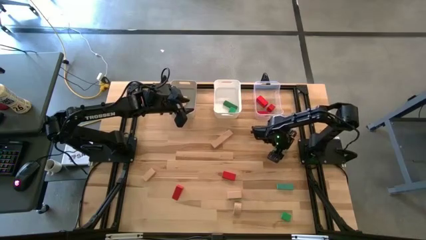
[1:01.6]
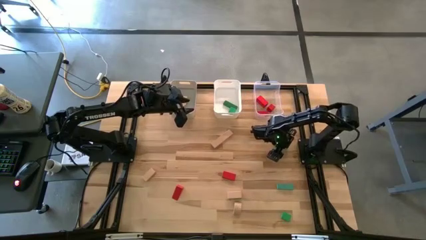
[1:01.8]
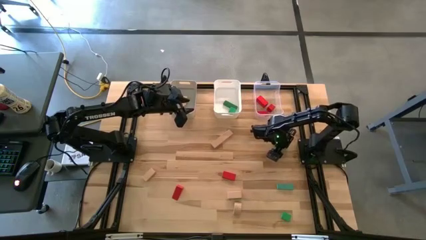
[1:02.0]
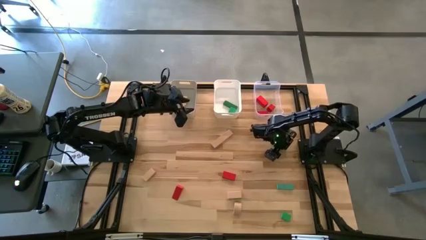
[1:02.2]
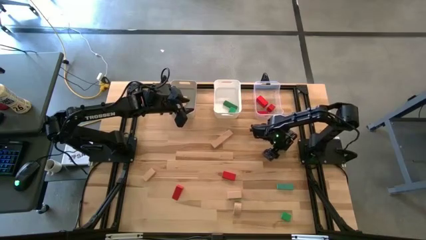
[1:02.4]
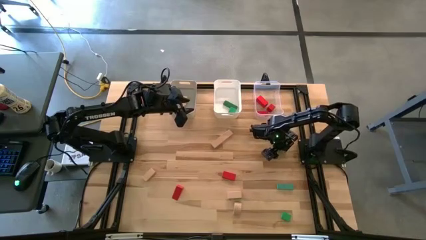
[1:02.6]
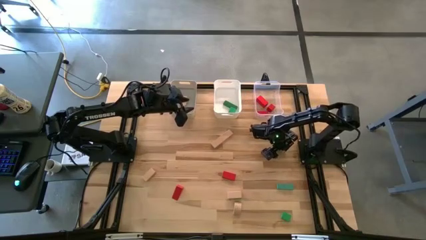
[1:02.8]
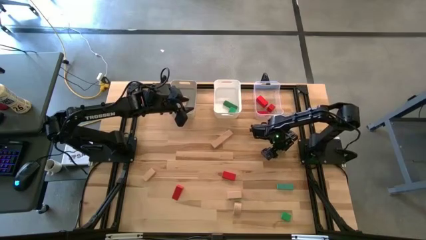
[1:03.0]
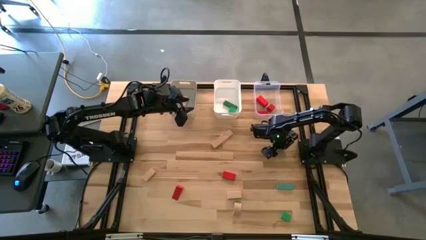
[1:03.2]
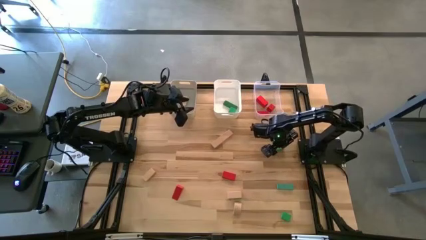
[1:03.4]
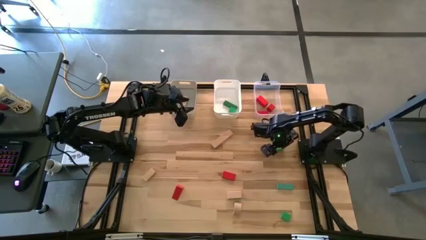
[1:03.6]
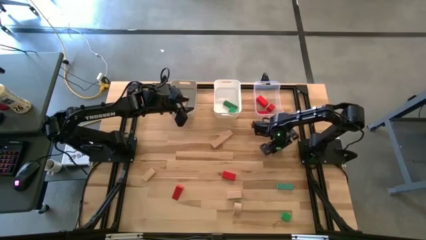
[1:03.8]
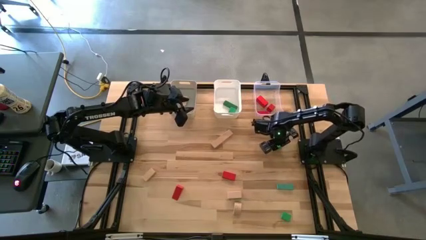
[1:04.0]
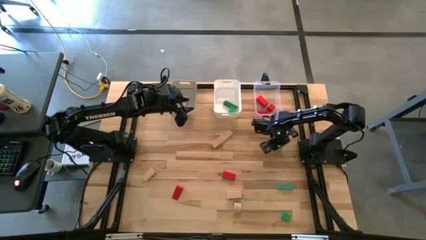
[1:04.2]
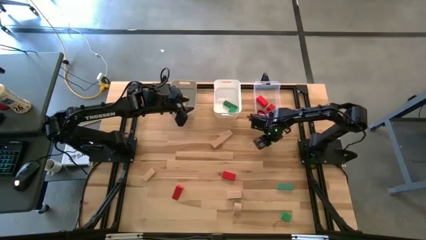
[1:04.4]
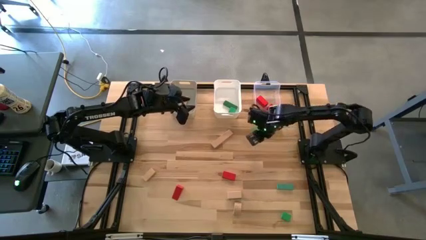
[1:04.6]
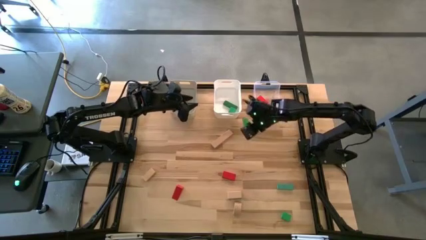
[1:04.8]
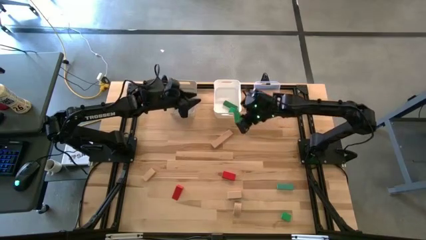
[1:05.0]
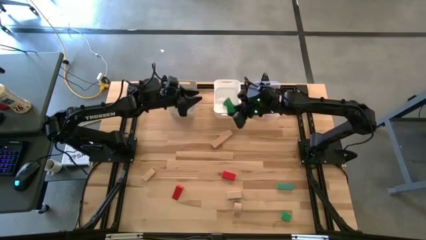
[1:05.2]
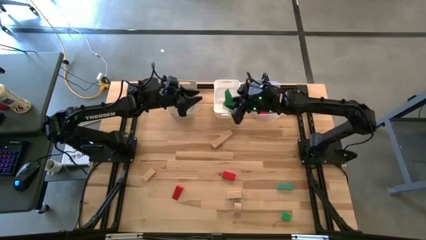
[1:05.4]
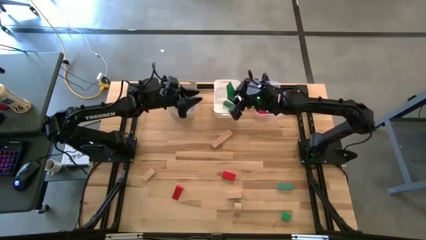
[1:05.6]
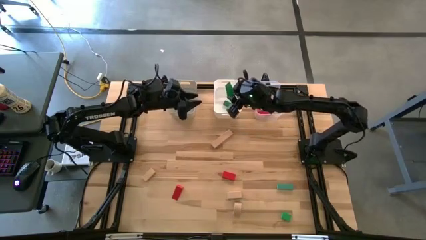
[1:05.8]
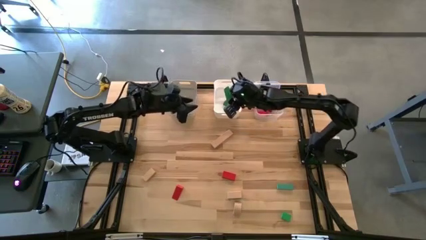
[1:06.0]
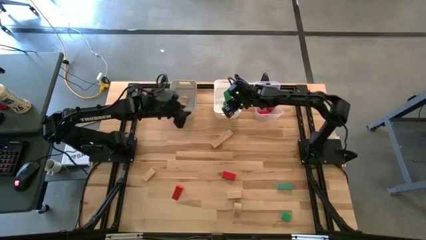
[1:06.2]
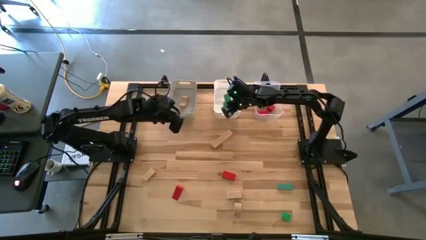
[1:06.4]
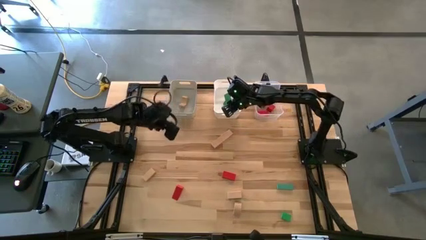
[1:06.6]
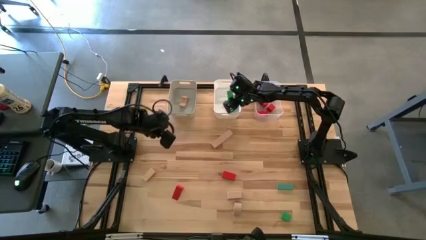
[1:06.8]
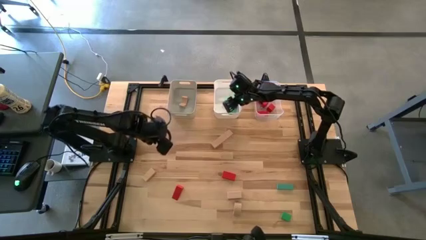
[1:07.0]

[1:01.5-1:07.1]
Task: Sort & place blocks by color
Put the green triangular block into the white bin

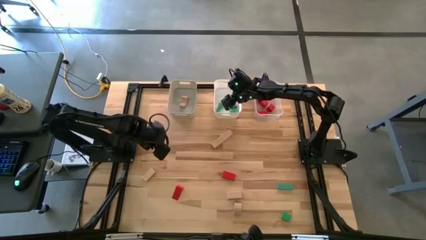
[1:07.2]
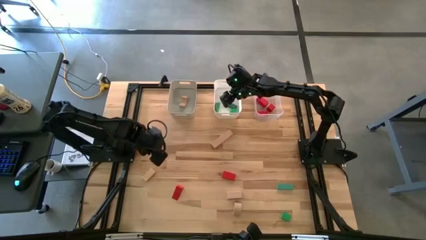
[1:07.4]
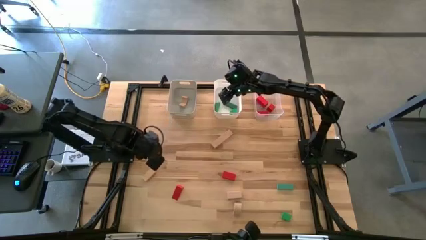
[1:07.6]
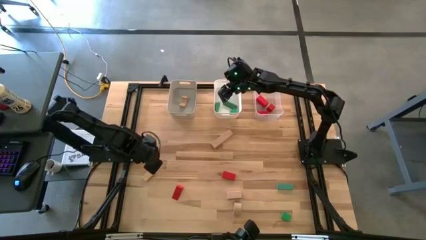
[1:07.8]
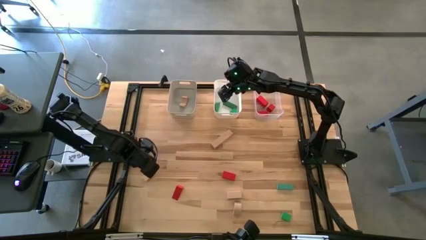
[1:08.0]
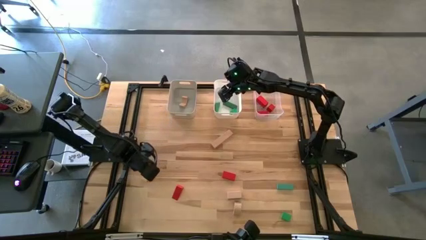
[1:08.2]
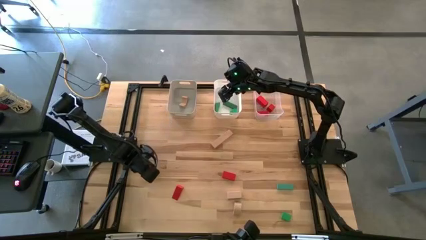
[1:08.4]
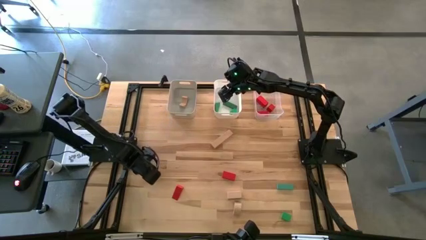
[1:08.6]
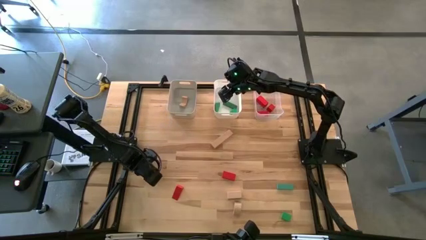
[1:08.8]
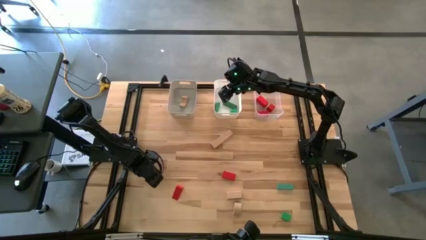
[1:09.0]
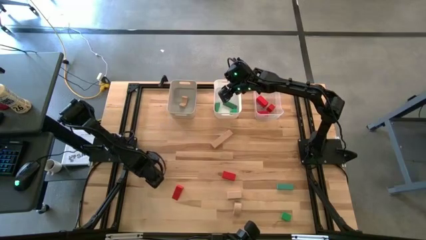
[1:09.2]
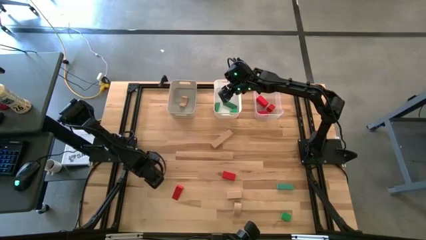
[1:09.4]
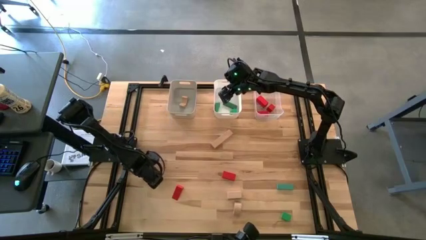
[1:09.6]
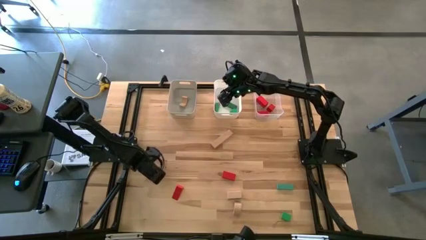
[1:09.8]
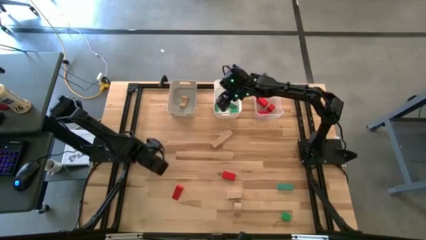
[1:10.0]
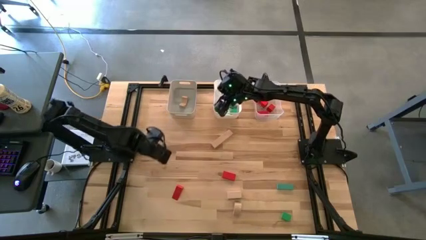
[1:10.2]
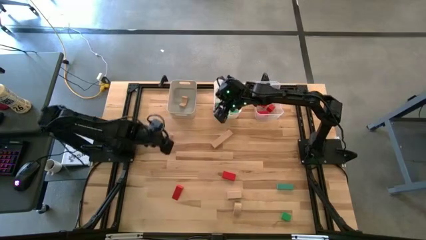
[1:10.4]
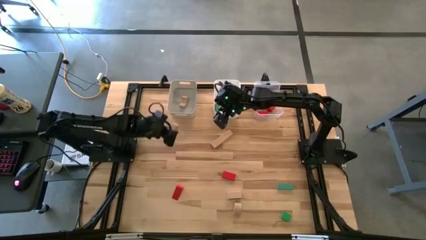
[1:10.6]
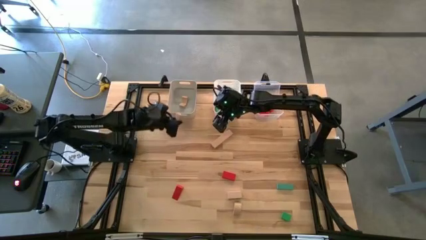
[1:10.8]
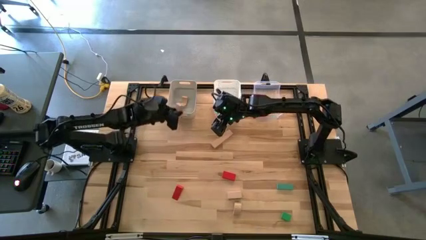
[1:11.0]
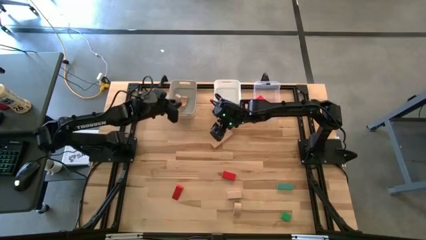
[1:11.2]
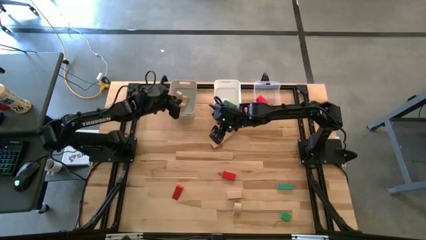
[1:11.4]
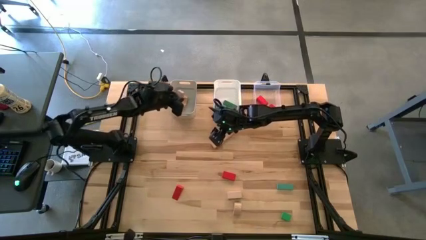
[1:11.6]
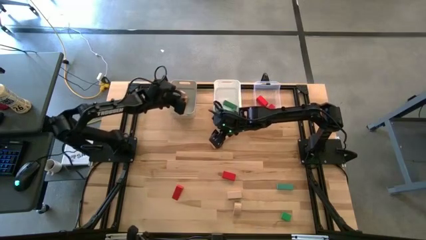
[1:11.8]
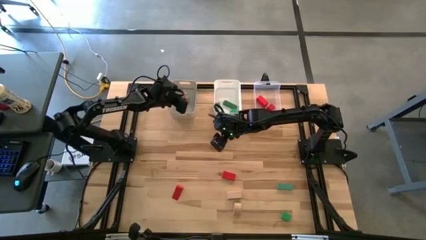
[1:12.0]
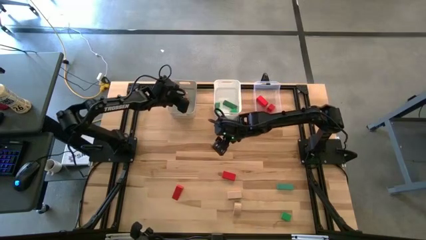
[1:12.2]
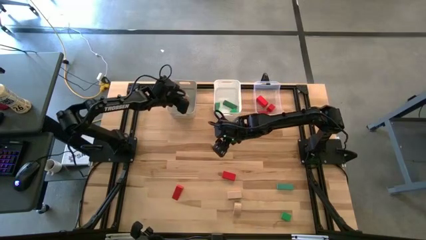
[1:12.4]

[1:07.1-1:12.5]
Put the brown triangular block into the gray bin

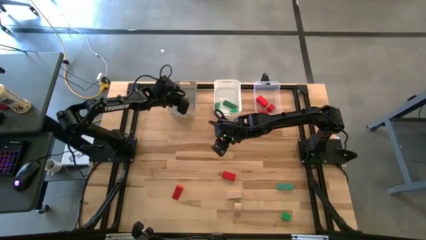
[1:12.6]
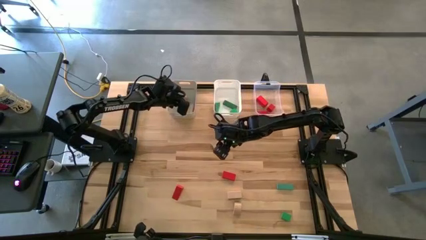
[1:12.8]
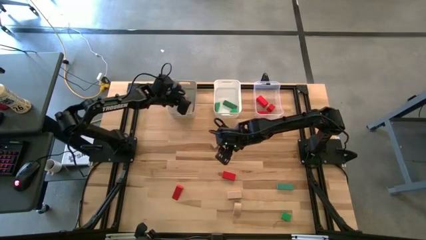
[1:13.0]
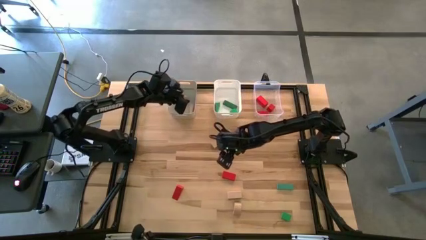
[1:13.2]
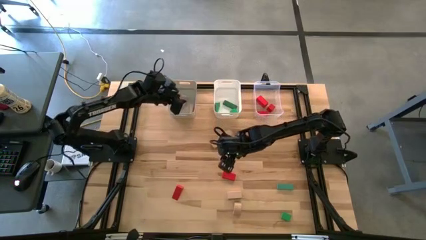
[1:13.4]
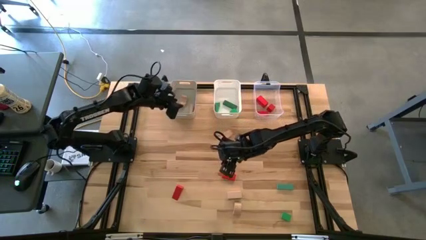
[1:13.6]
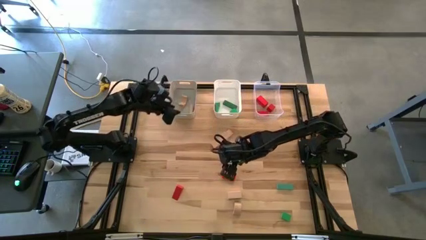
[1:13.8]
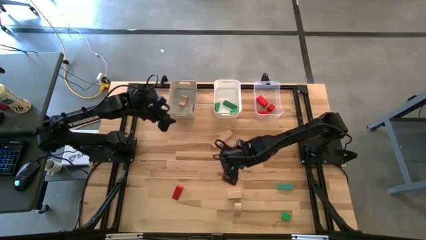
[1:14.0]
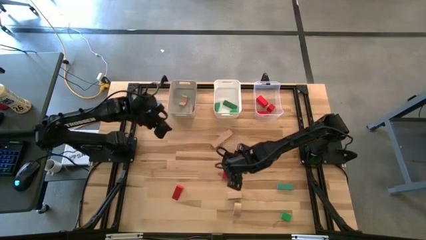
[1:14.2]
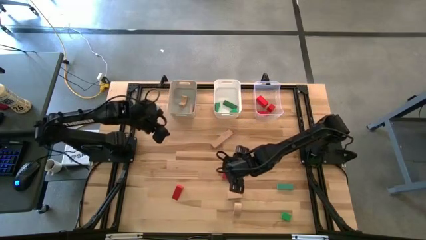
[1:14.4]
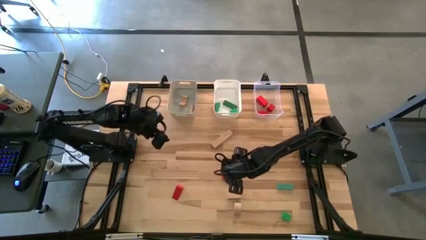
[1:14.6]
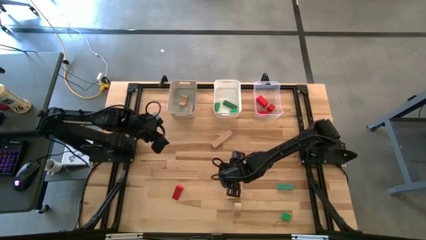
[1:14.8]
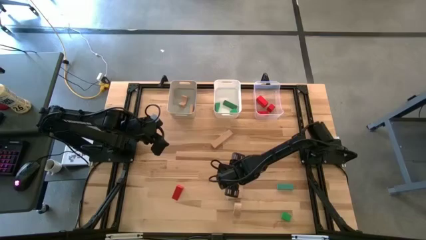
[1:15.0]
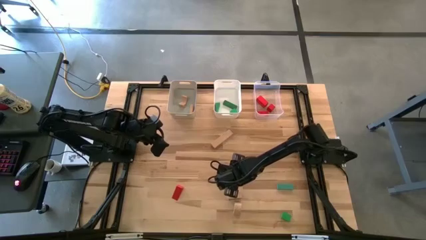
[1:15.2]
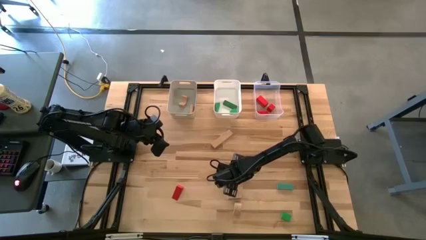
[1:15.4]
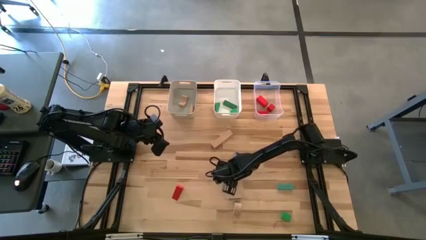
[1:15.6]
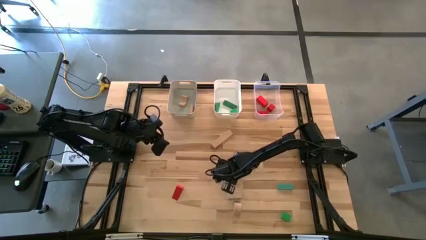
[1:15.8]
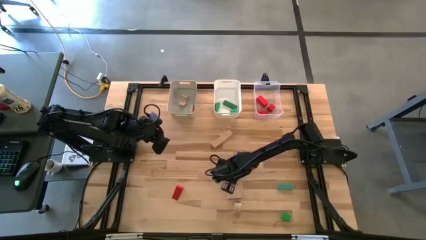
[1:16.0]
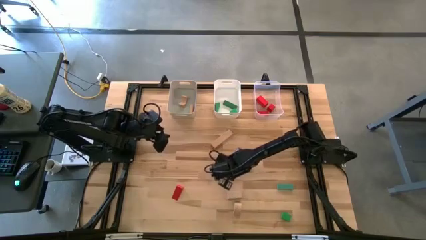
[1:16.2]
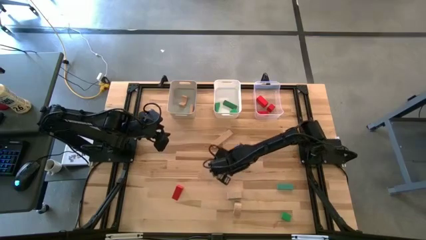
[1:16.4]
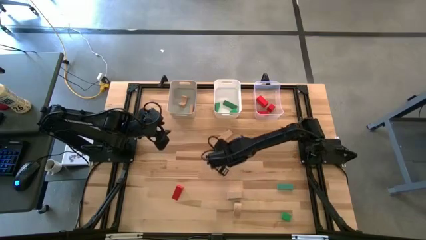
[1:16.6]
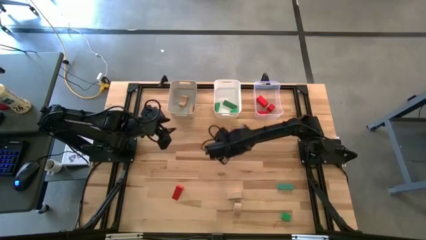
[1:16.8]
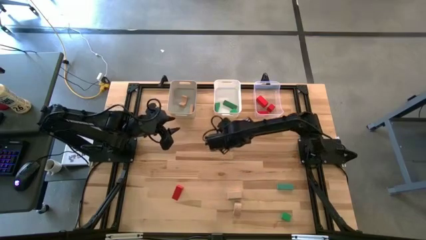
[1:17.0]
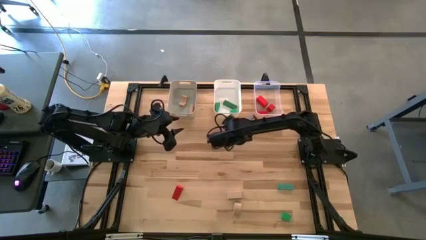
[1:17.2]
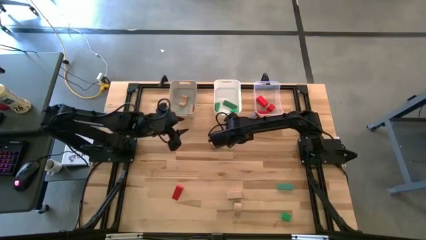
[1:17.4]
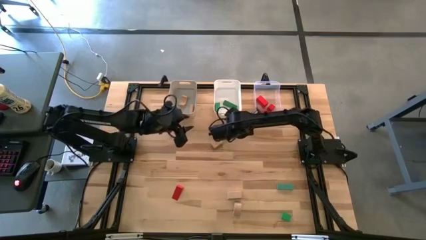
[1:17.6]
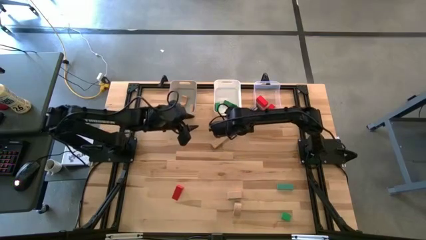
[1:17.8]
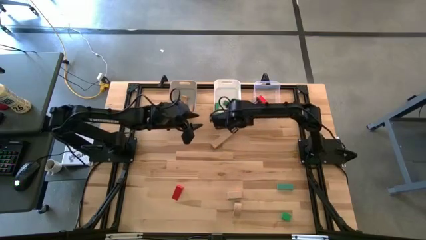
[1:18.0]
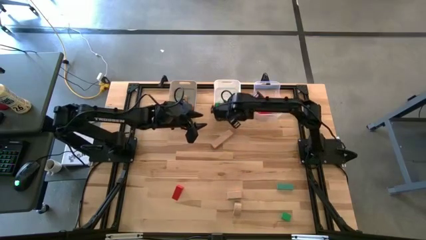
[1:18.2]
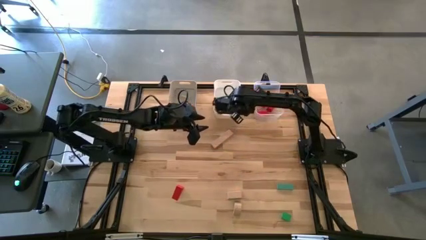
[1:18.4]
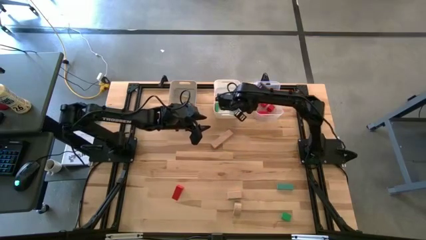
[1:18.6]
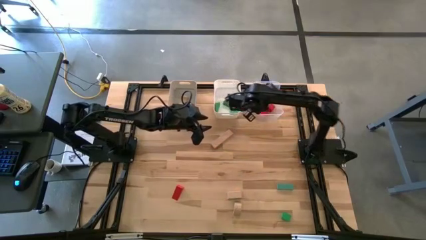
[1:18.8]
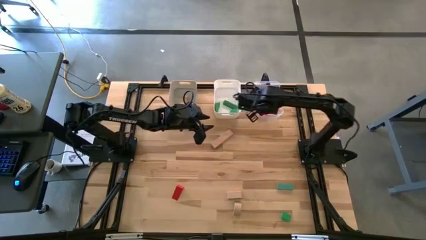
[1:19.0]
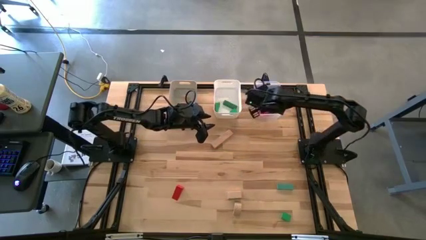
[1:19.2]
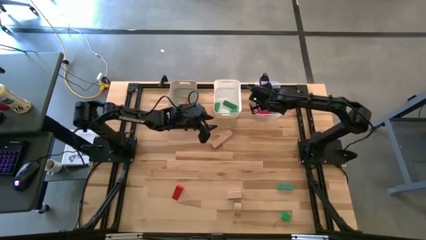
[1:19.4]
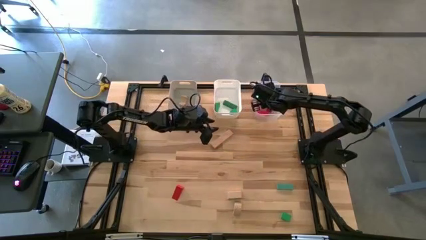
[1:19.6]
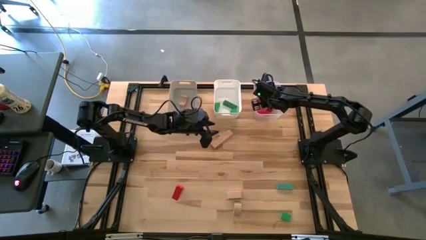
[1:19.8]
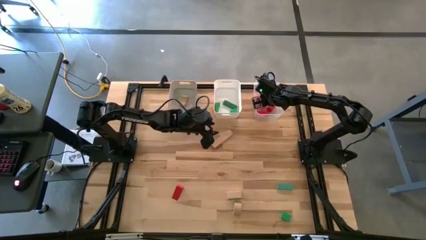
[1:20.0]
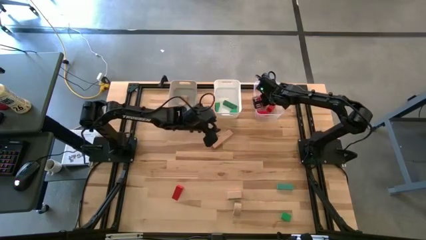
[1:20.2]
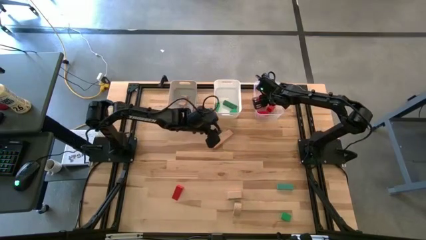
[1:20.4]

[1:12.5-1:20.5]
Put the red block into the transparent bin
